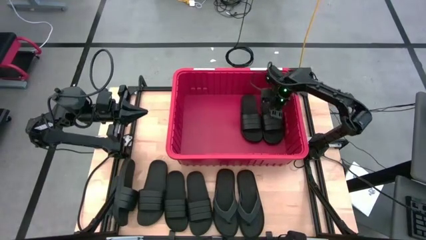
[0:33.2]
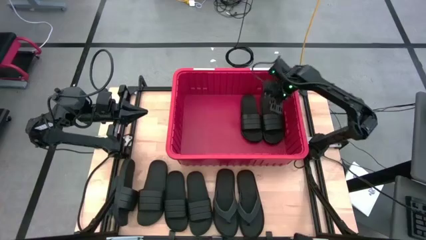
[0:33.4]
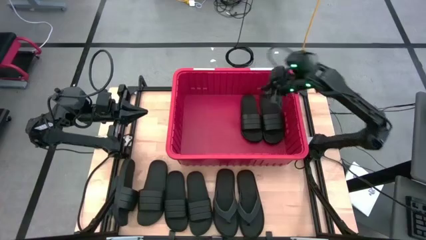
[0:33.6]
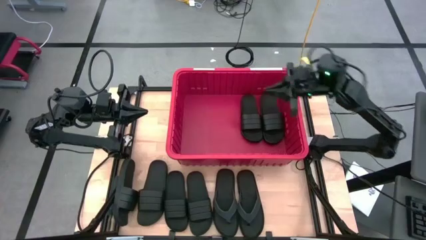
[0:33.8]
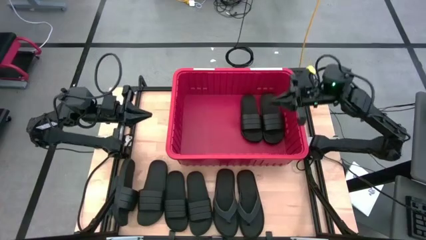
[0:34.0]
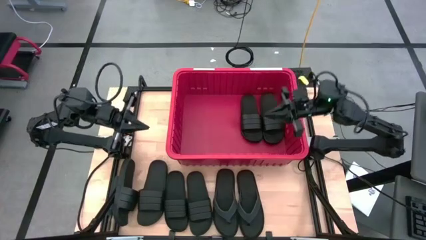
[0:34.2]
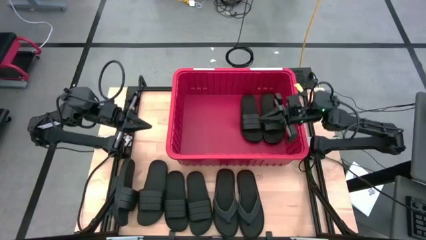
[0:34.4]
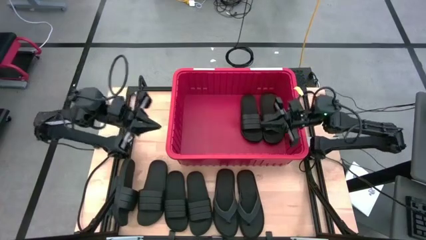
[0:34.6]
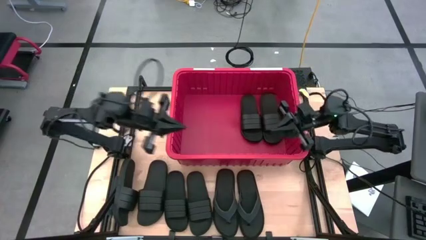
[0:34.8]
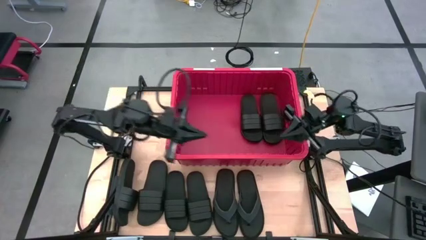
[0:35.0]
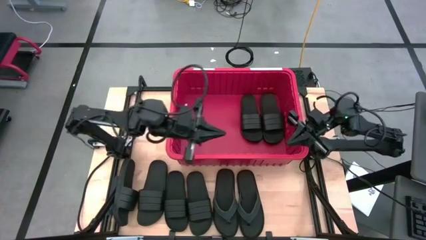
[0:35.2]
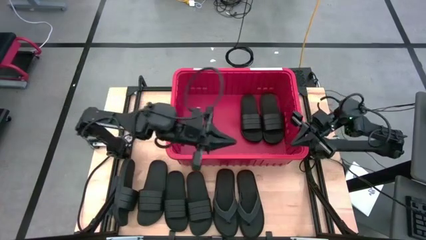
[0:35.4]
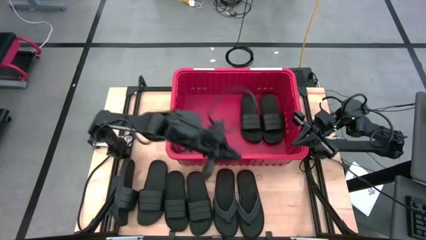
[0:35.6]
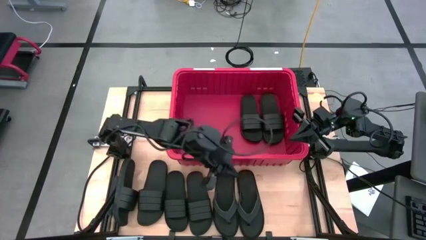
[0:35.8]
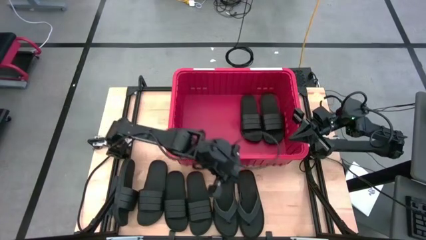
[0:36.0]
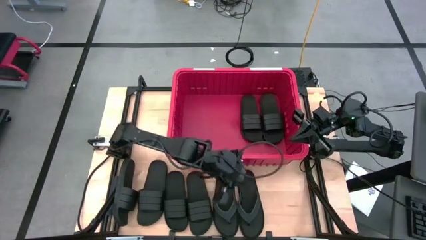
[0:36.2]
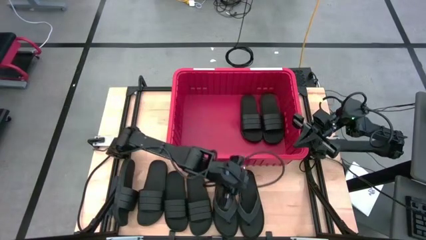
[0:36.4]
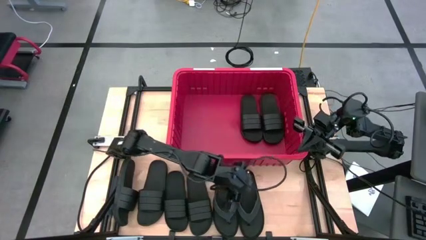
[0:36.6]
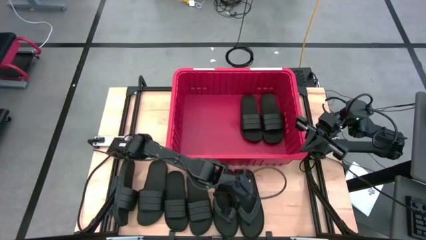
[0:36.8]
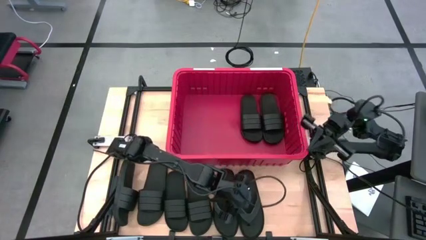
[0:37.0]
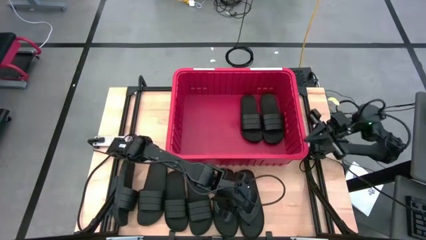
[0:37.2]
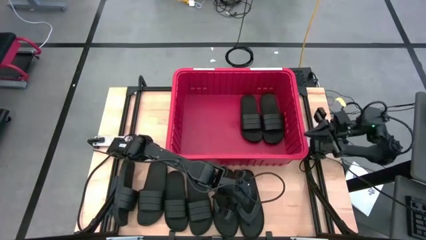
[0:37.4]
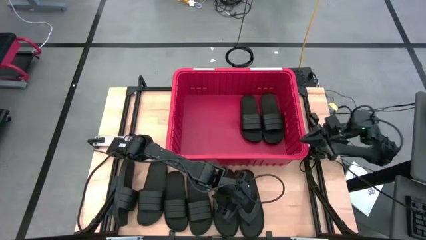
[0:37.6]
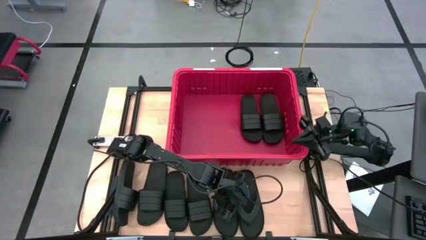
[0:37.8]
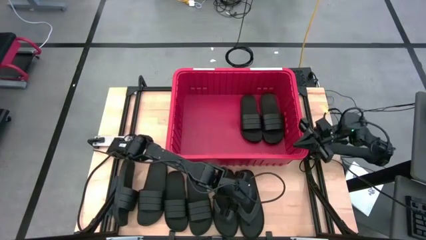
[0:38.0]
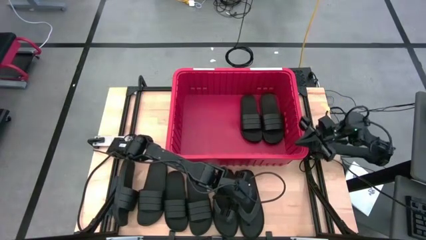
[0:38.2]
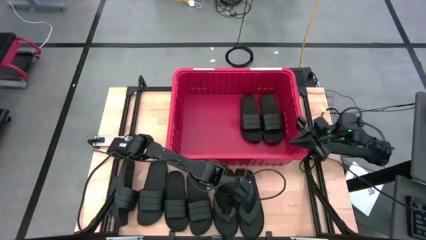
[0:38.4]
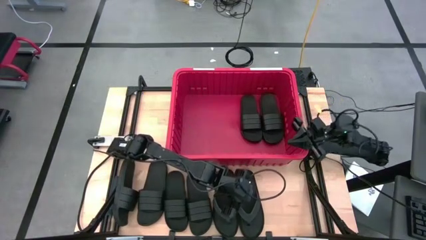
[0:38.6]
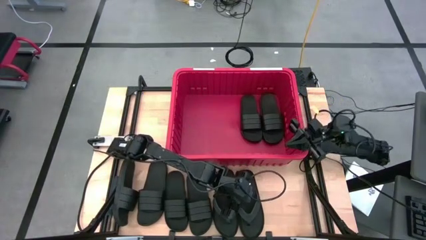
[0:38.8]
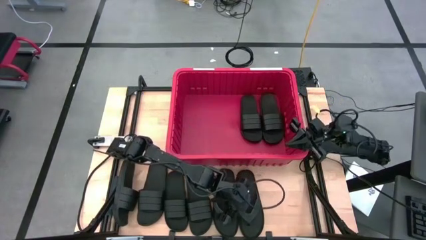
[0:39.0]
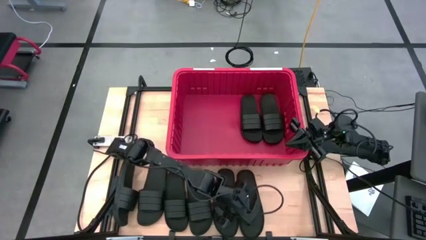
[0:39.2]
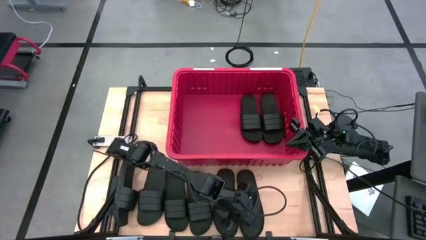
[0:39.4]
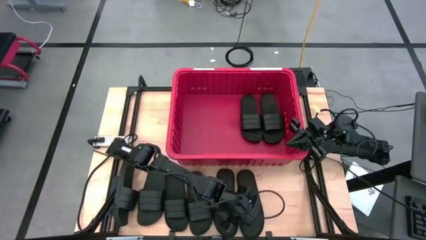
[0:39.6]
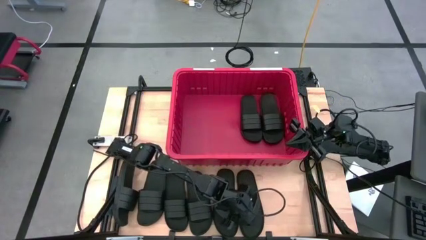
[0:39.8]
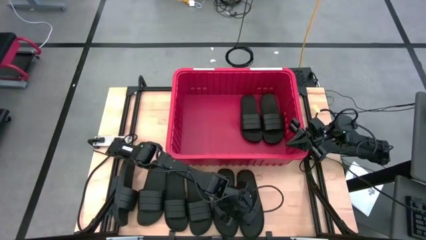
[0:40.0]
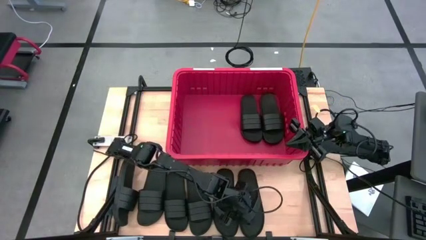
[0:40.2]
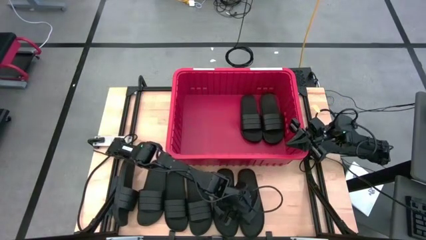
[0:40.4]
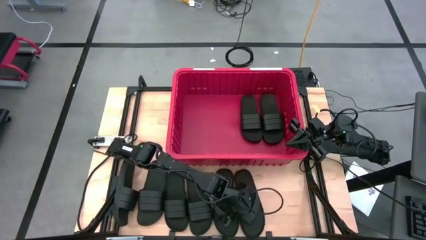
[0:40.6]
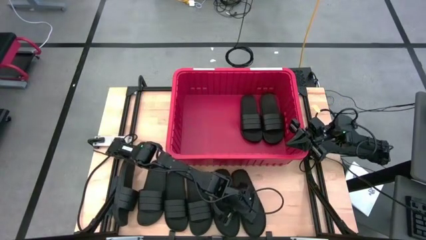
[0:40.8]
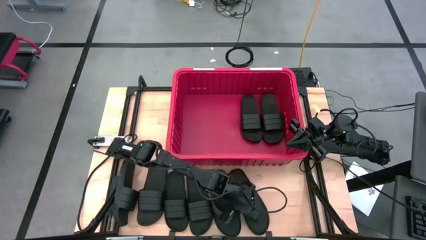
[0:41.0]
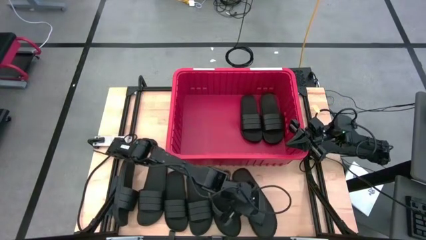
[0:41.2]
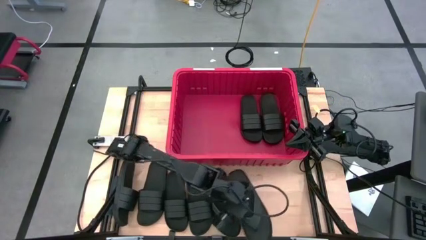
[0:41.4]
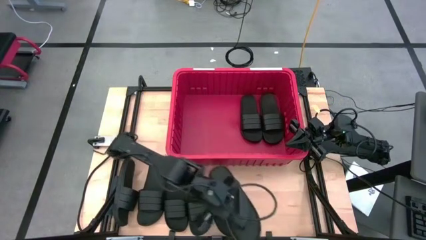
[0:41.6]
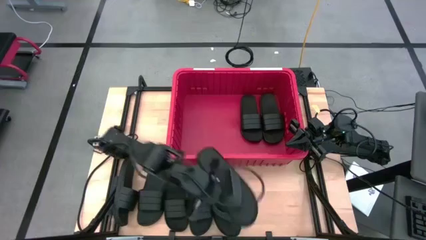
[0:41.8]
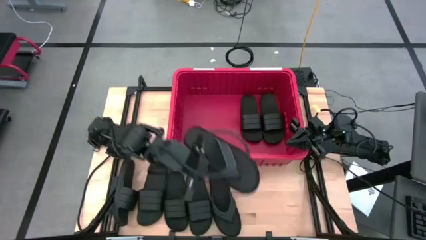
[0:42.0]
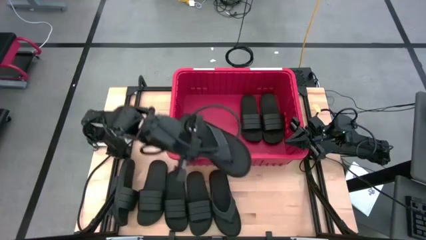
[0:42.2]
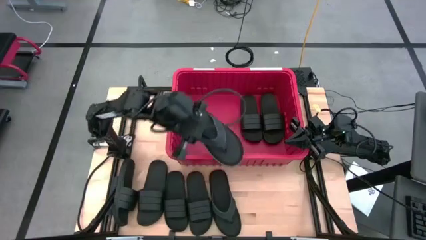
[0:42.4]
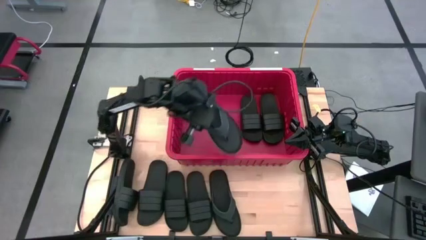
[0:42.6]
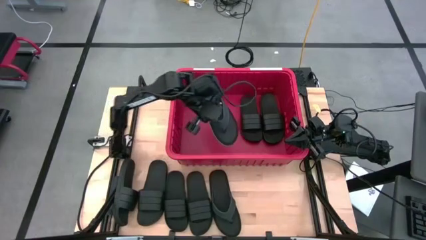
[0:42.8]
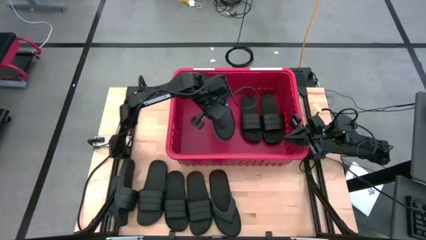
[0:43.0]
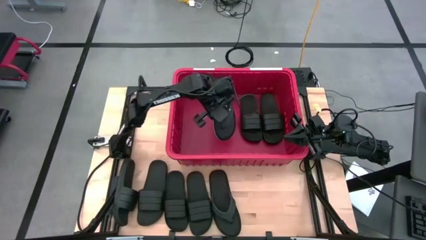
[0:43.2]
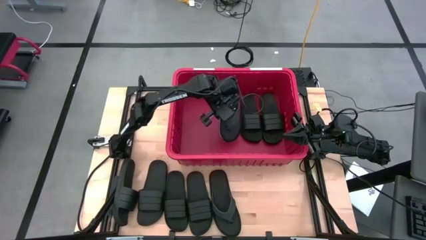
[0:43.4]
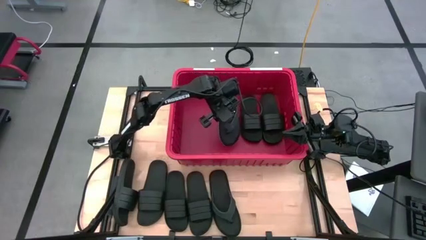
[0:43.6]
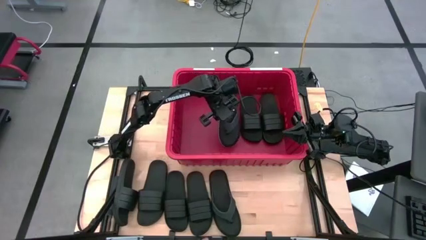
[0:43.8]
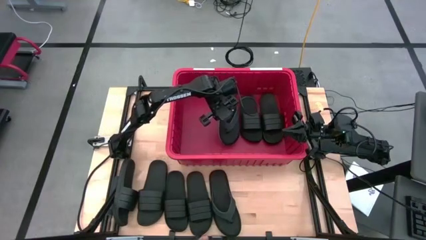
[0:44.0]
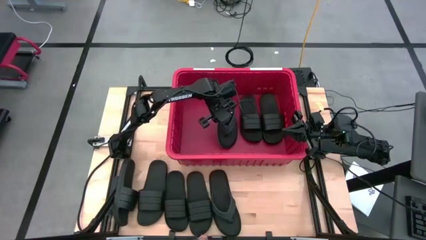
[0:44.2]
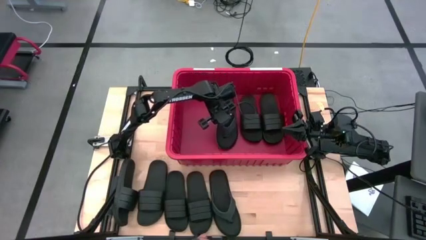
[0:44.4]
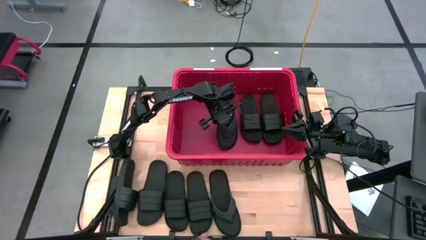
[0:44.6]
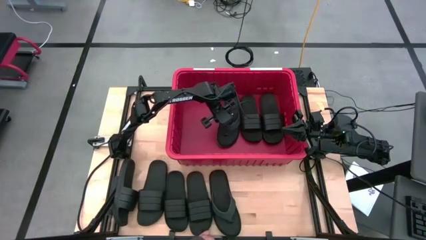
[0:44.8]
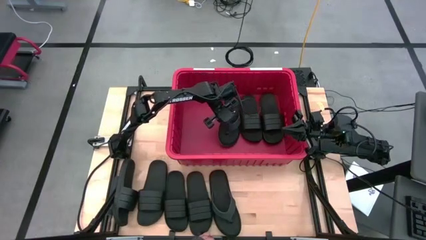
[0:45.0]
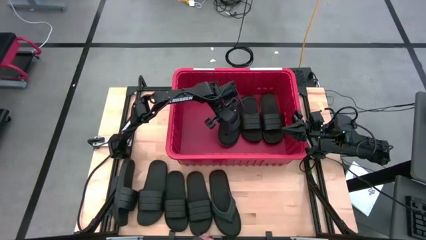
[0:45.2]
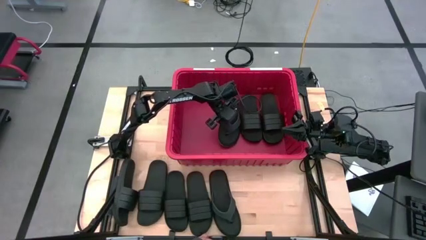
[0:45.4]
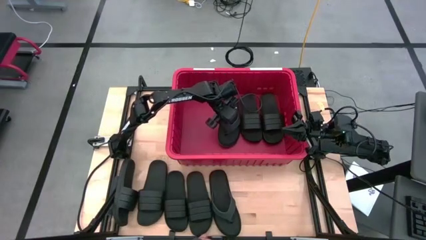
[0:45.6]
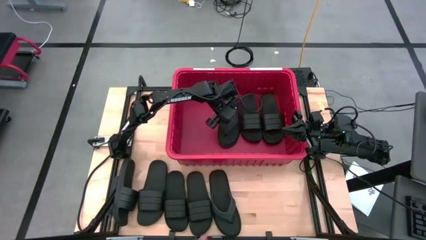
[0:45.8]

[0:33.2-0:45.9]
Task: Pick and place slides into bin
Put the right black slipper into the red bin
